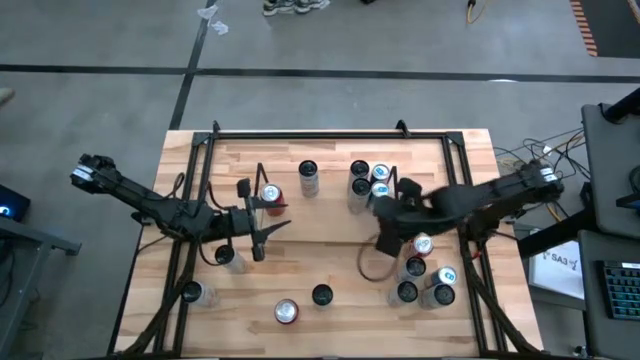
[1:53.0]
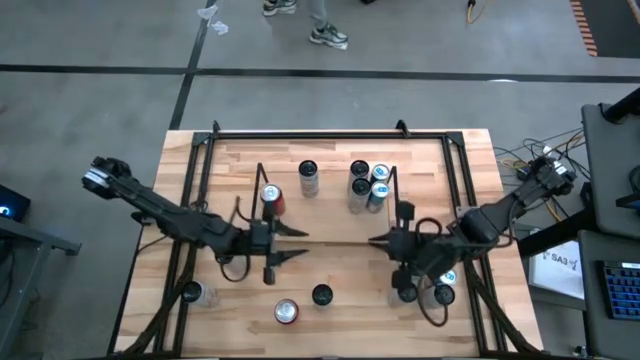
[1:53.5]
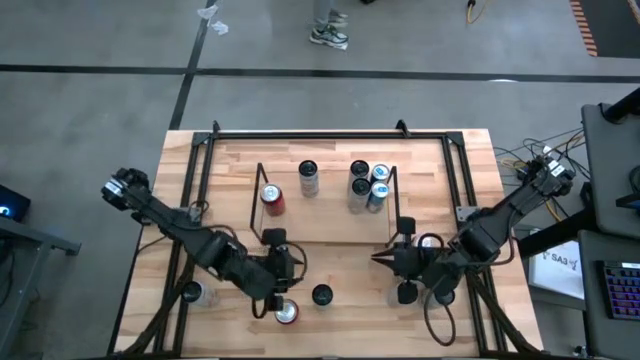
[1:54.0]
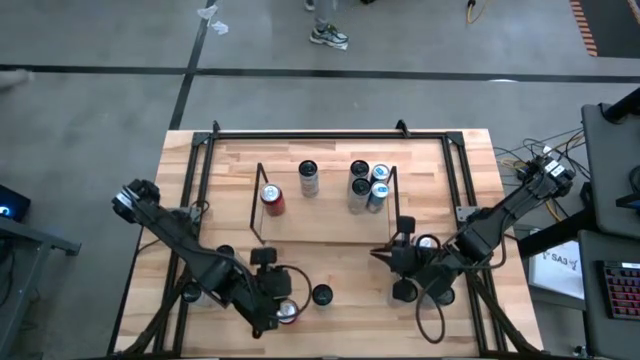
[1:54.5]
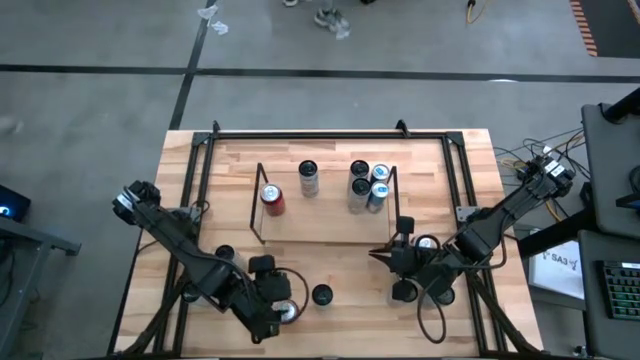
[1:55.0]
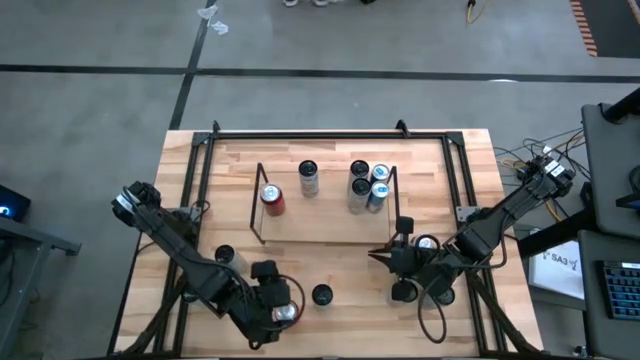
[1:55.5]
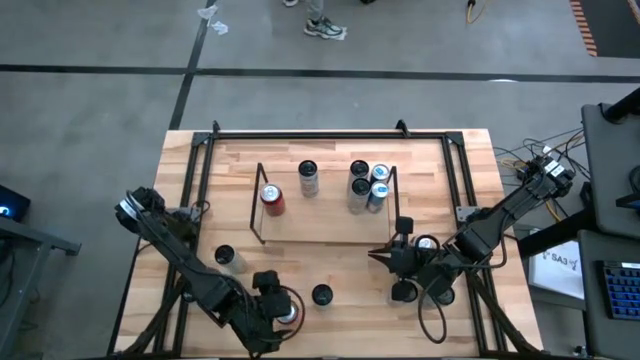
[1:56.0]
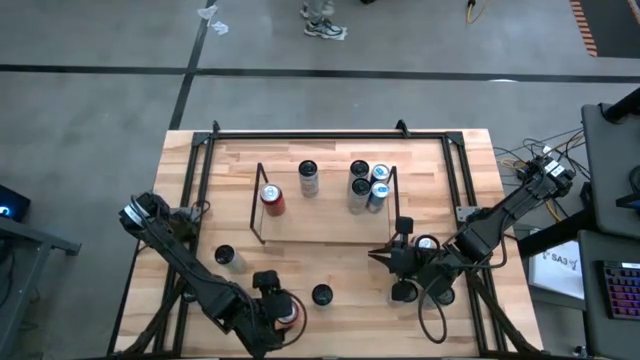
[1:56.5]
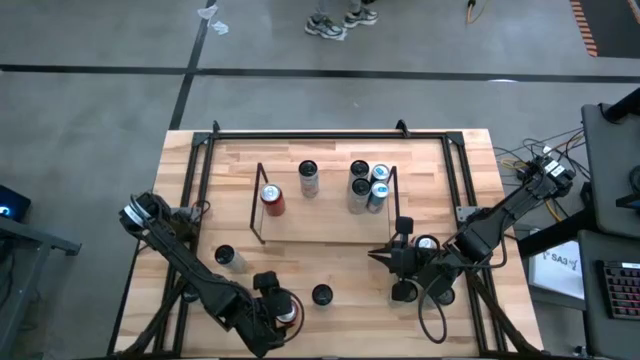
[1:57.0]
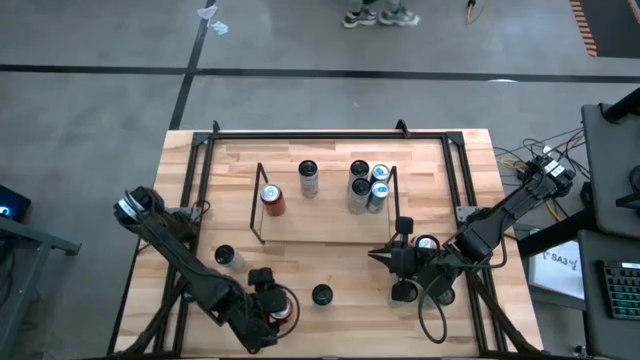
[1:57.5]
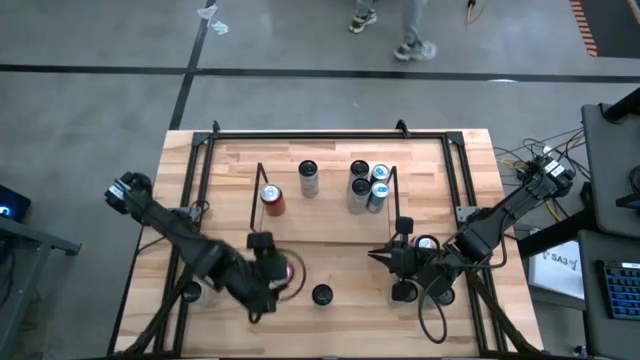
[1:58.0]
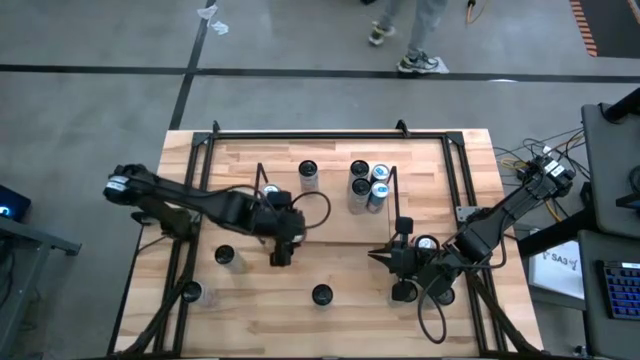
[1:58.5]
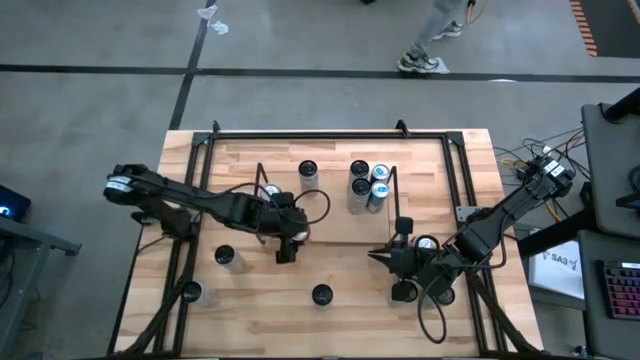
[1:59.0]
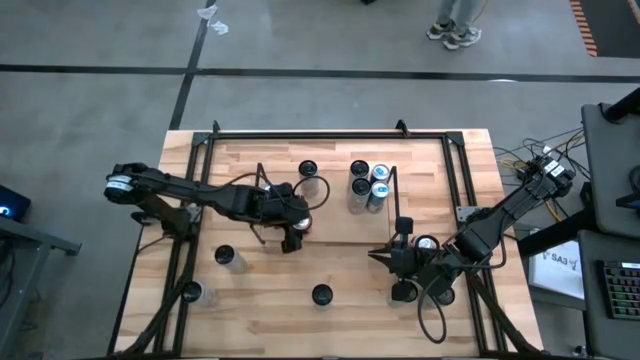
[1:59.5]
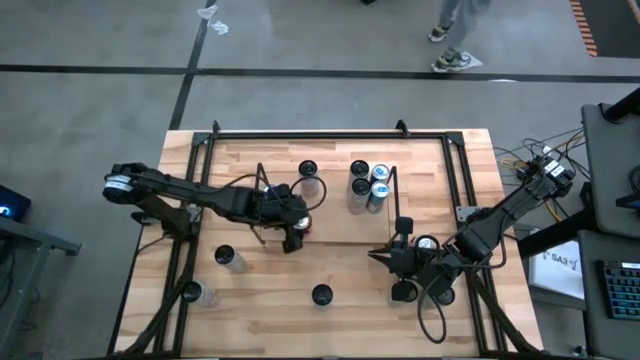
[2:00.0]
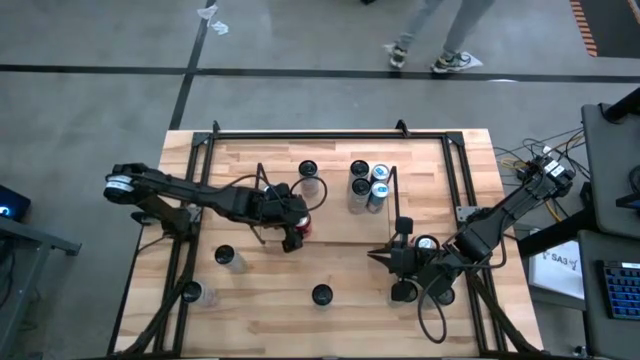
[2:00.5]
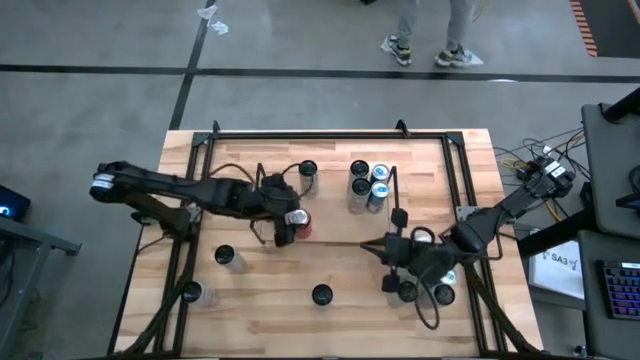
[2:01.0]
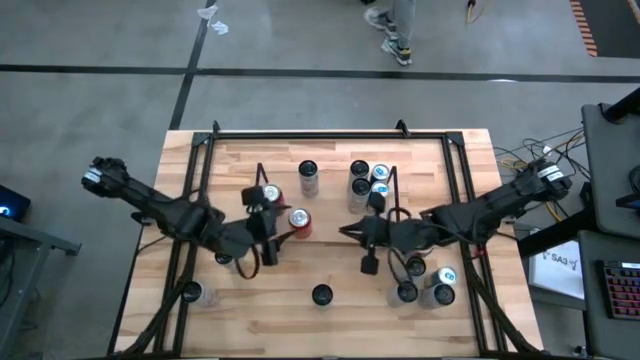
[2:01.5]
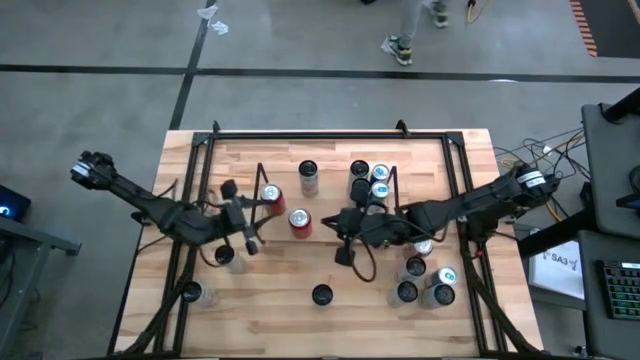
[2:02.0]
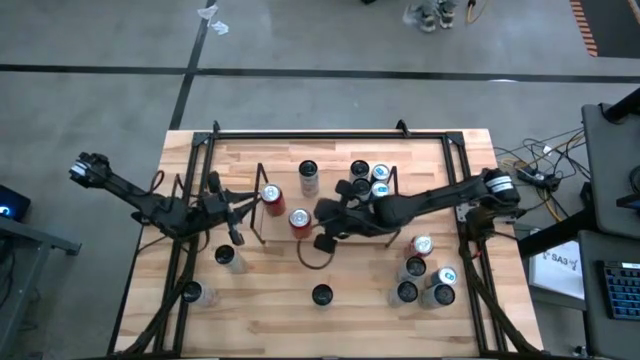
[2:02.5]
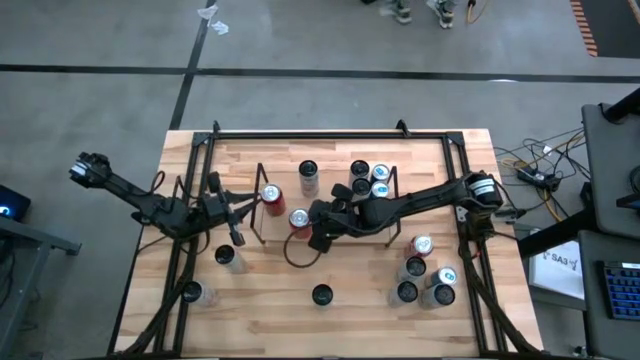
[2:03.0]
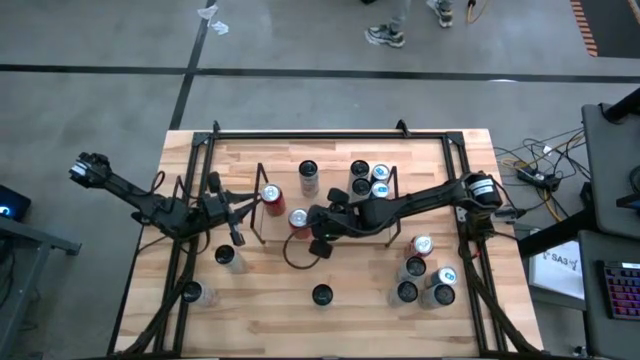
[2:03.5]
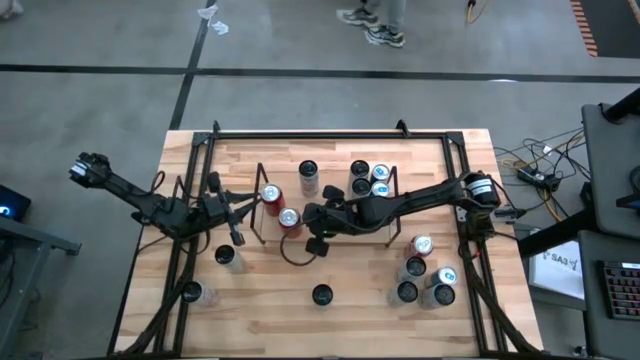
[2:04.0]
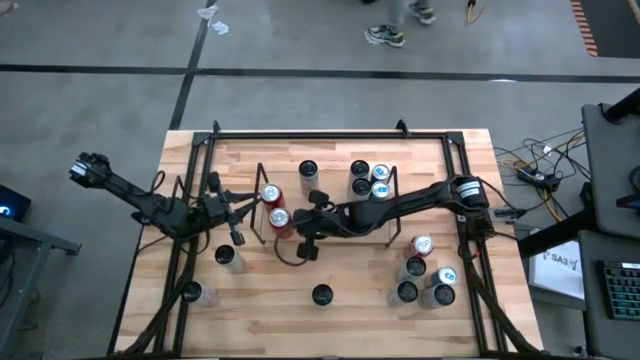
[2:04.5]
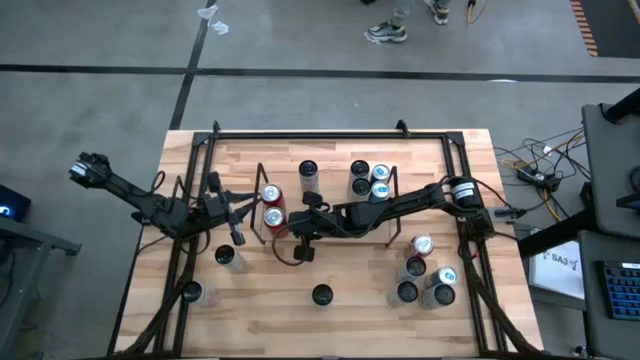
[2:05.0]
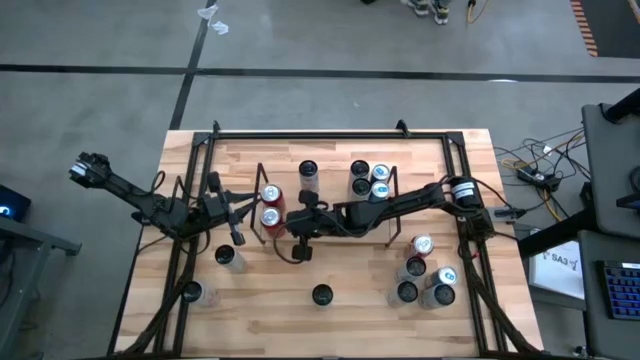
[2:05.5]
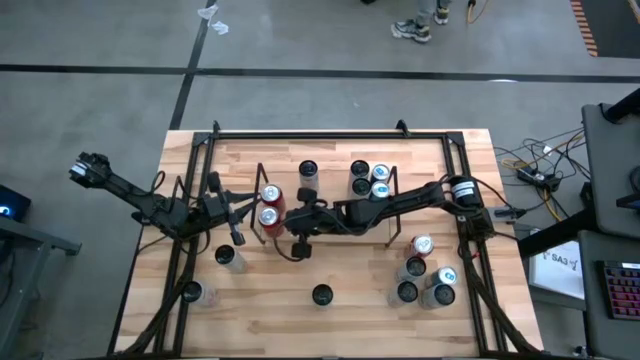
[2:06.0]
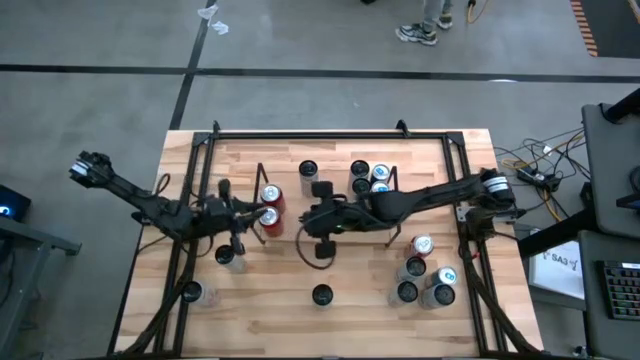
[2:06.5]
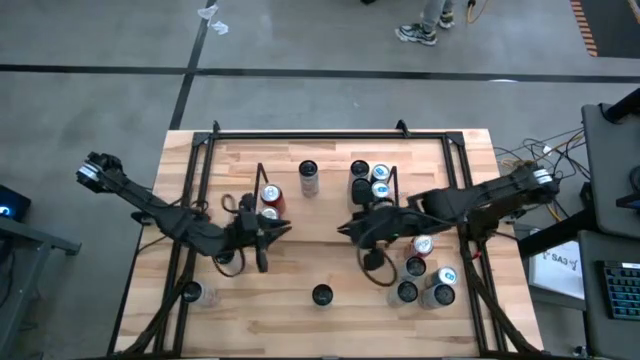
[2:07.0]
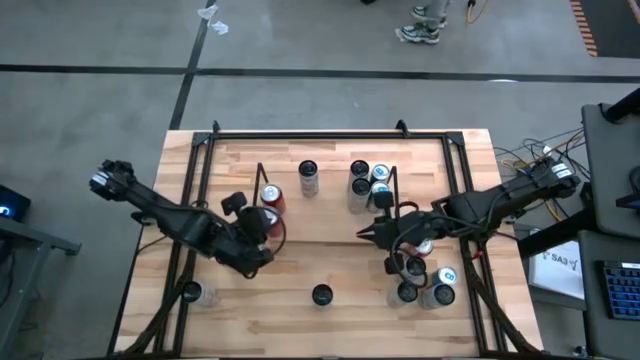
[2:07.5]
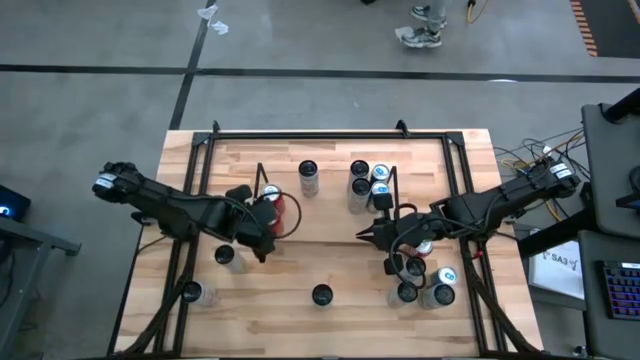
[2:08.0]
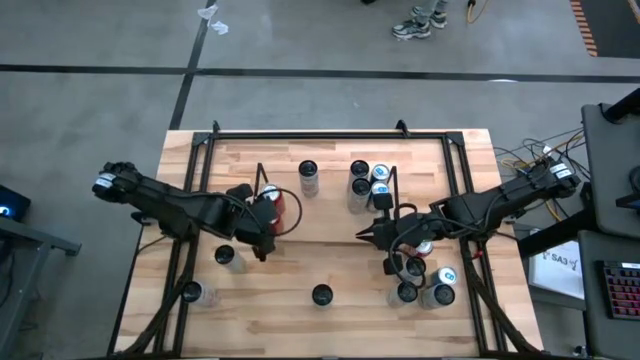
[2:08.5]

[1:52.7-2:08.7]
Task: Place canned beverage on shelf
Put the red and black soda can on the shelf aligned with the other red and black soda can

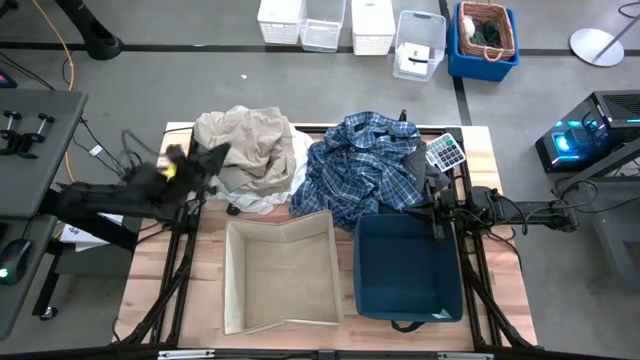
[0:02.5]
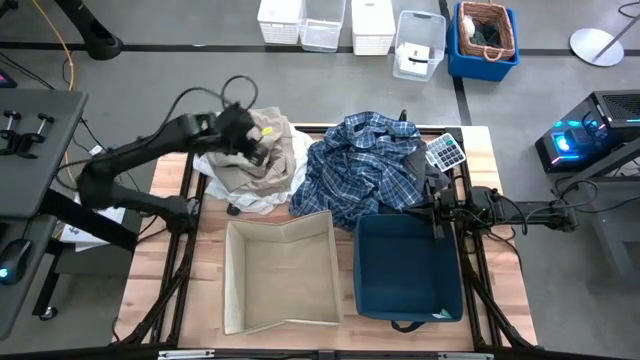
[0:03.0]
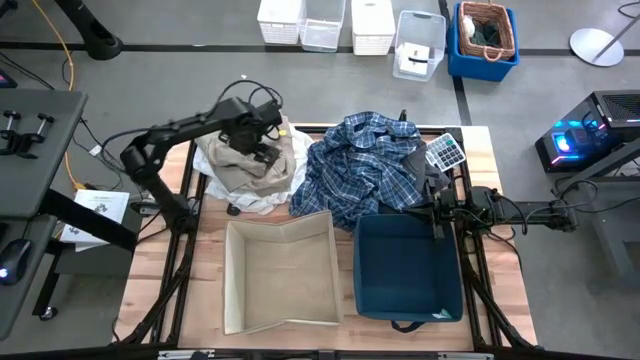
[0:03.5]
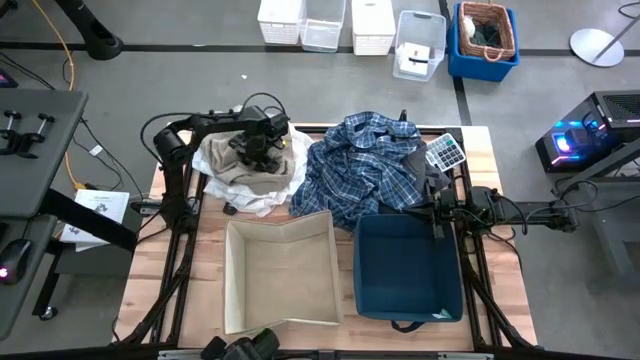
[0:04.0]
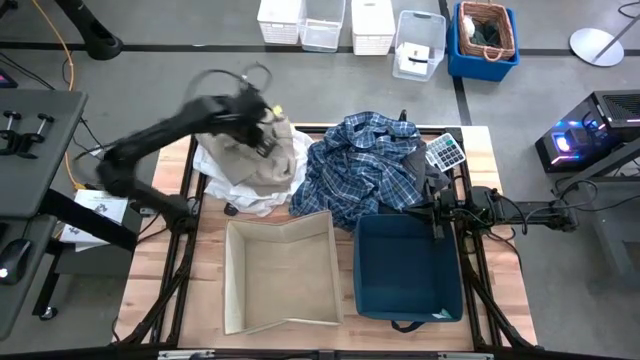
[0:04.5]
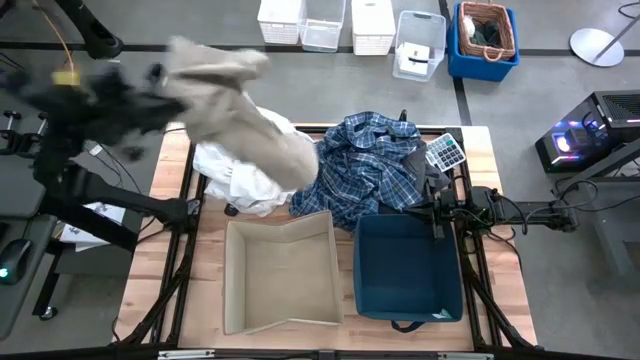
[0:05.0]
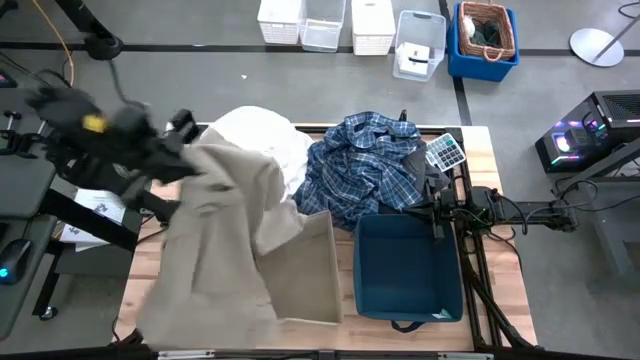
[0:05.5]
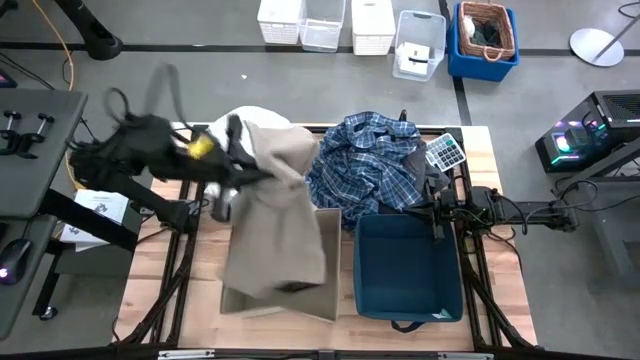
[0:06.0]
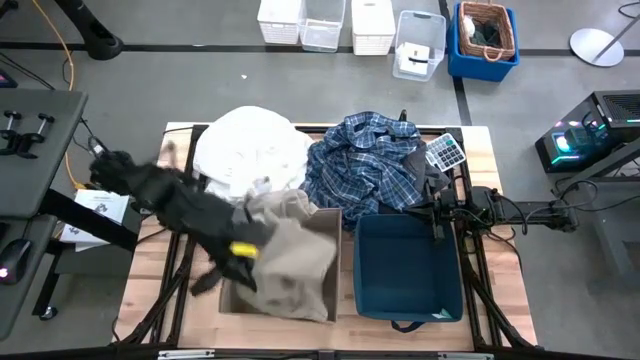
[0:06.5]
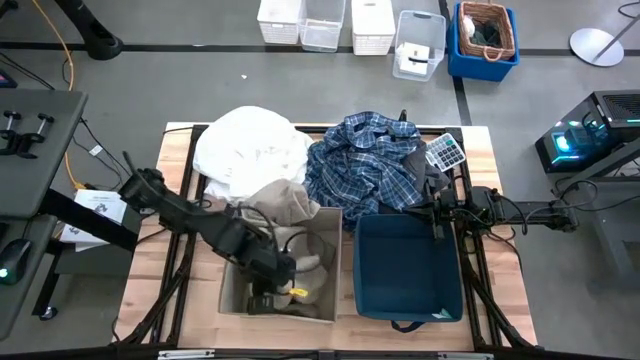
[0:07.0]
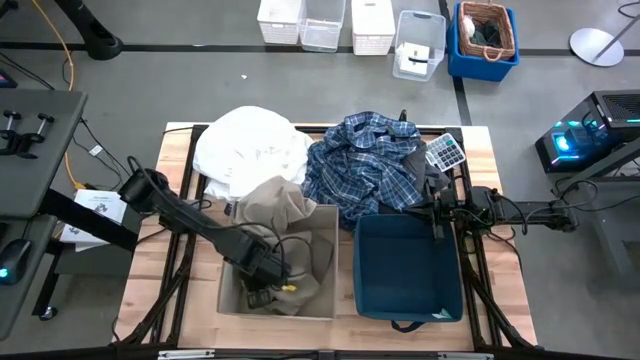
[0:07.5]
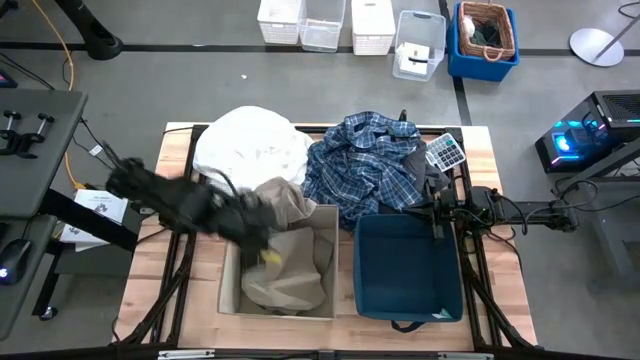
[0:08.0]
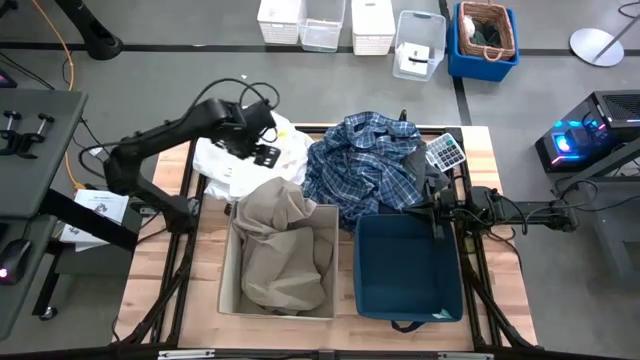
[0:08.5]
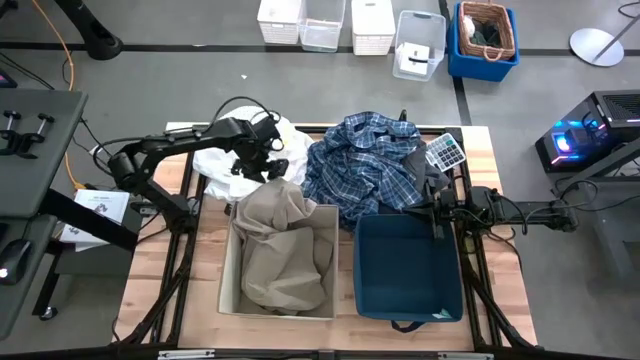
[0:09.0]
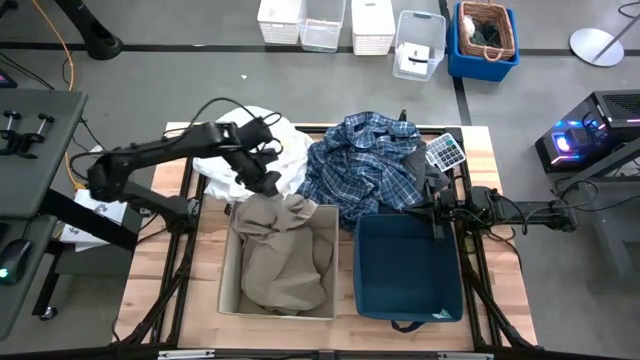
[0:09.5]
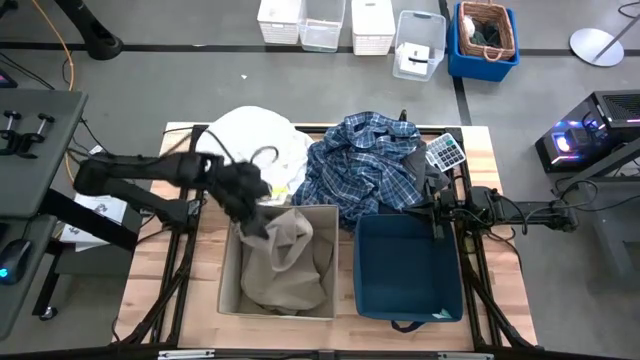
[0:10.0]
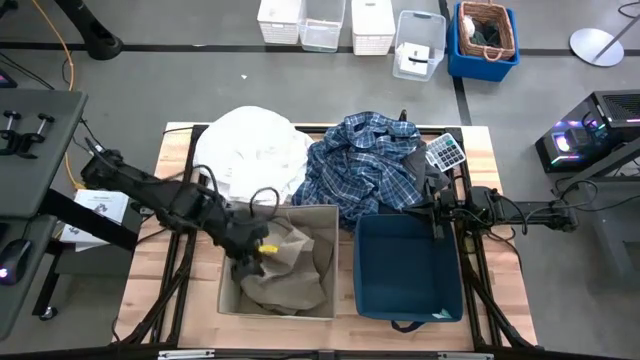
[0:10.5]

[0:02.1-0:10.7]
Task: Sort clothes
Put the brown shorts into the white laundry bin
